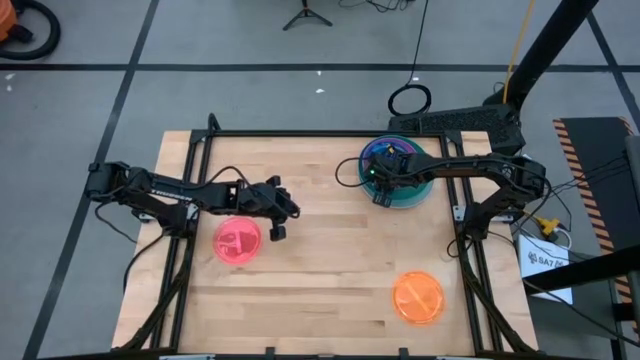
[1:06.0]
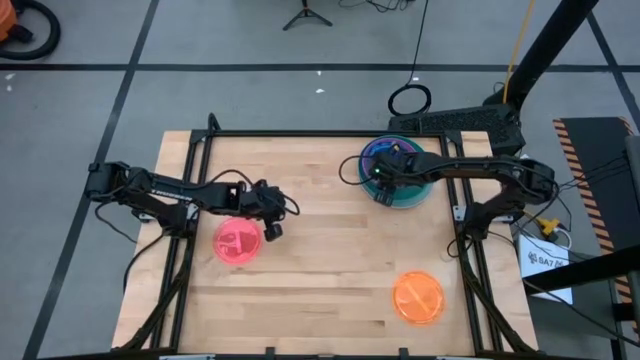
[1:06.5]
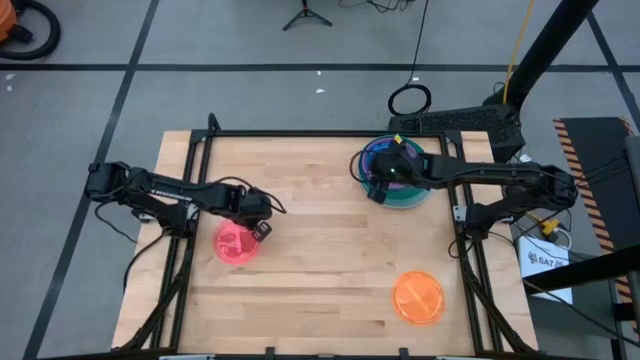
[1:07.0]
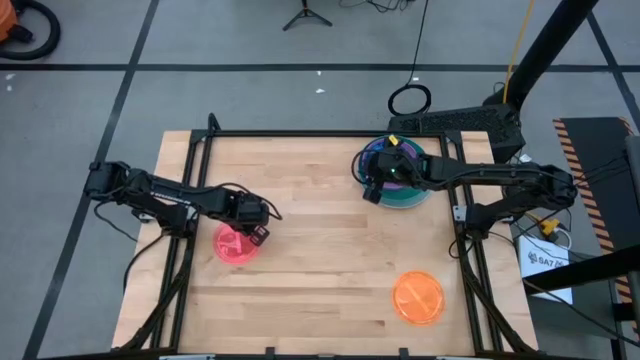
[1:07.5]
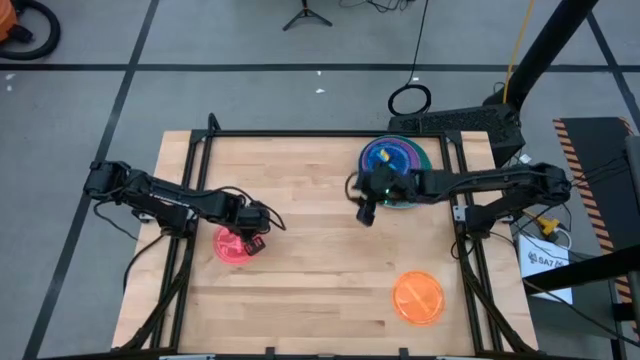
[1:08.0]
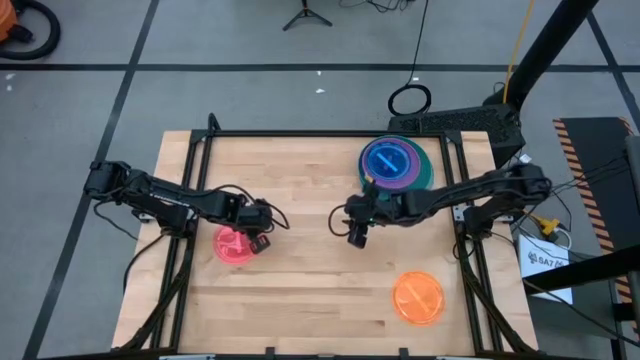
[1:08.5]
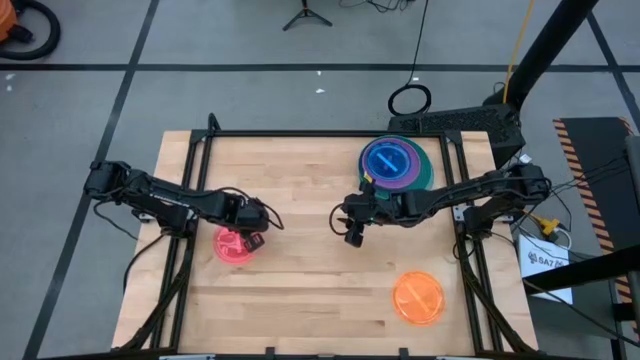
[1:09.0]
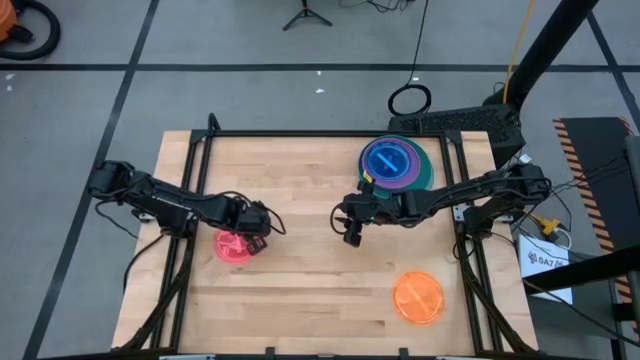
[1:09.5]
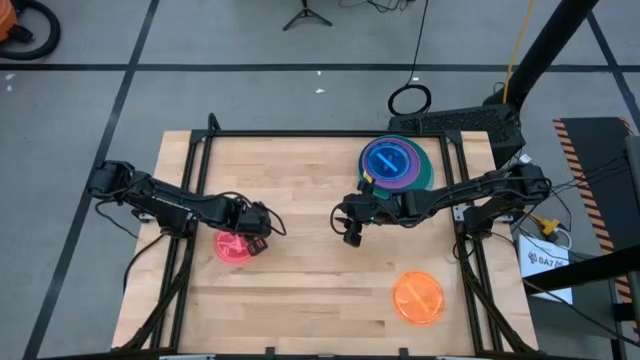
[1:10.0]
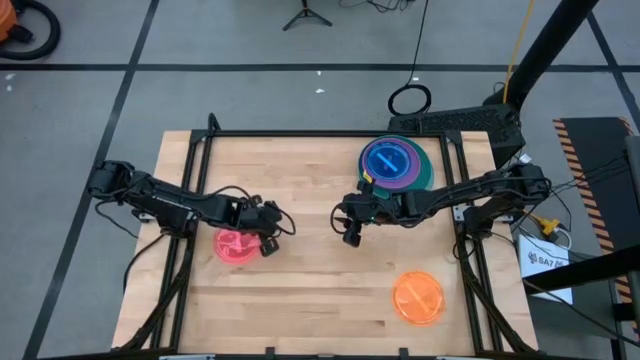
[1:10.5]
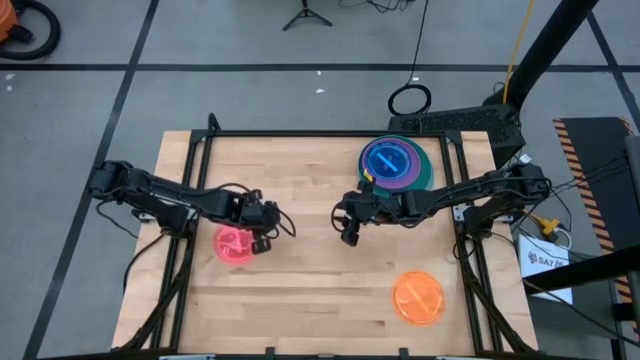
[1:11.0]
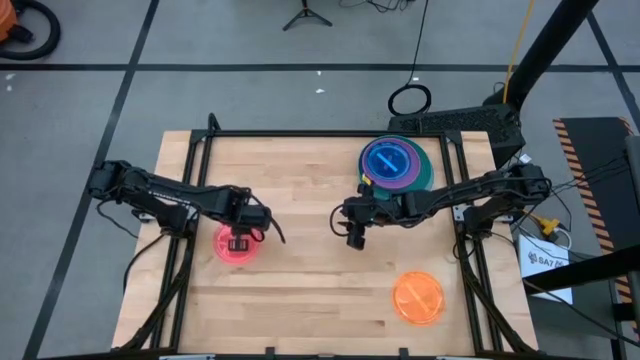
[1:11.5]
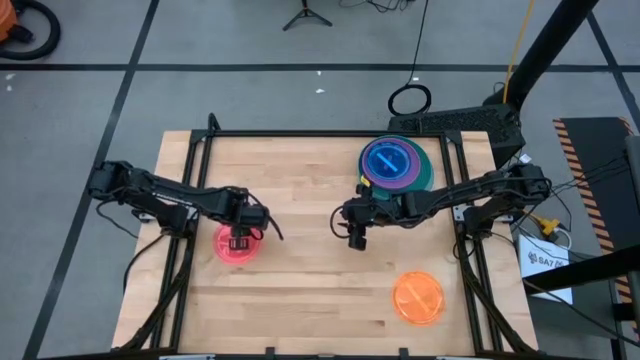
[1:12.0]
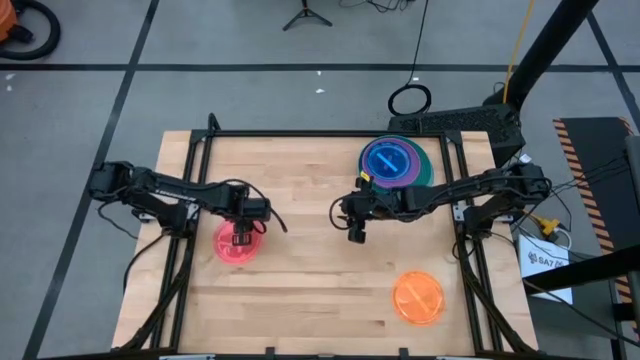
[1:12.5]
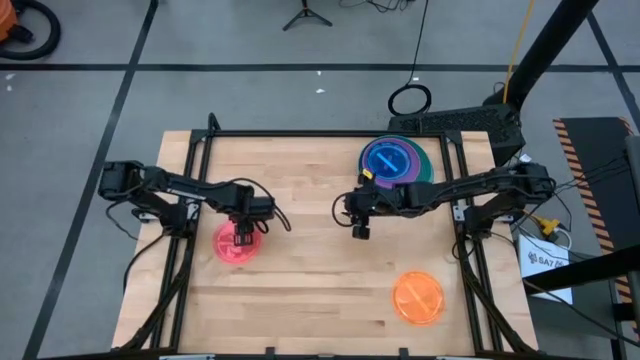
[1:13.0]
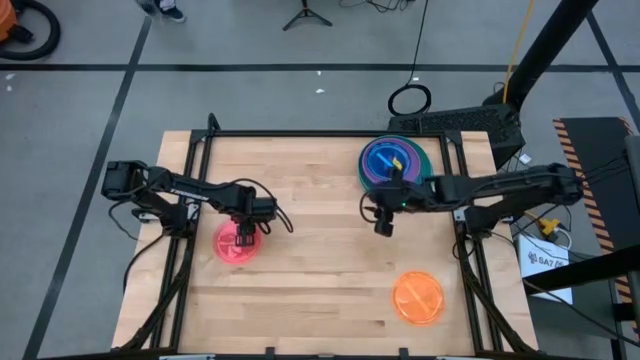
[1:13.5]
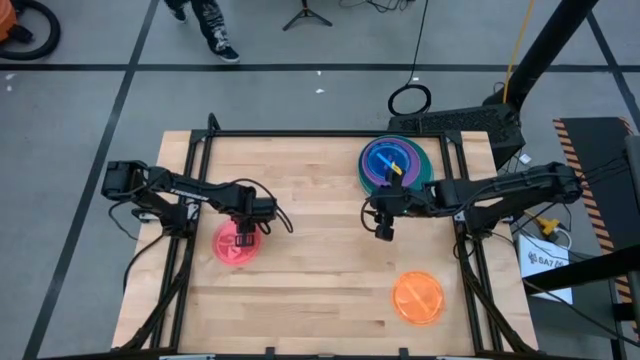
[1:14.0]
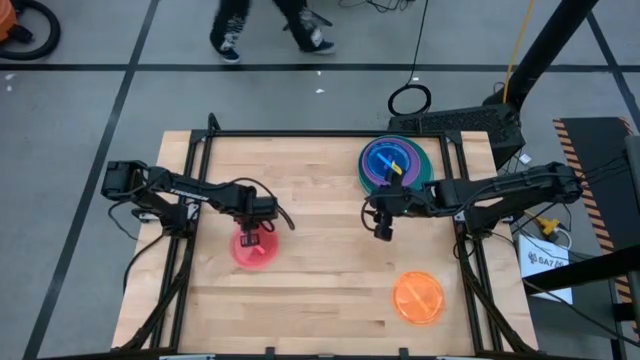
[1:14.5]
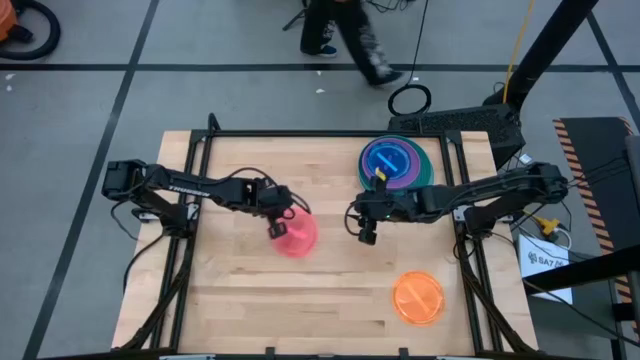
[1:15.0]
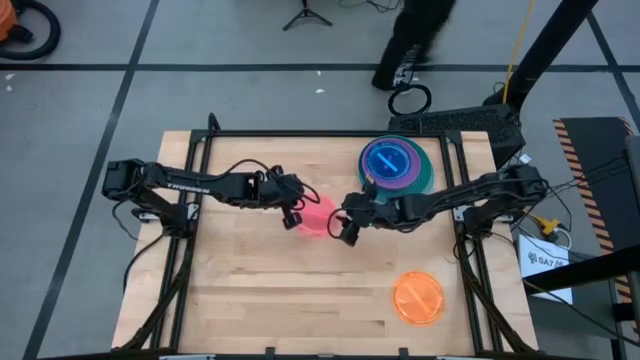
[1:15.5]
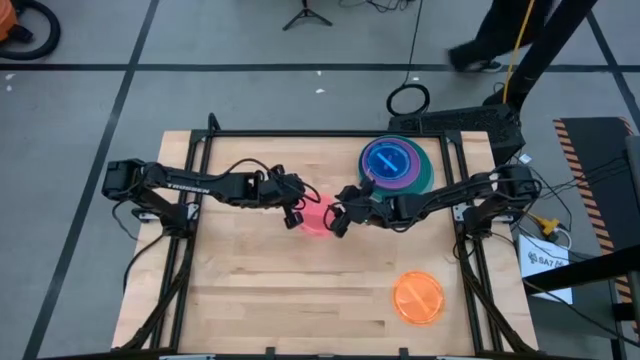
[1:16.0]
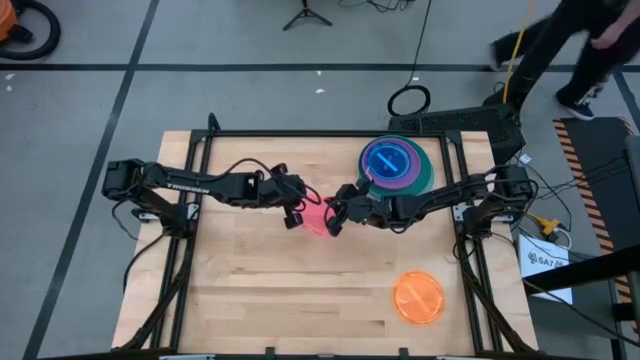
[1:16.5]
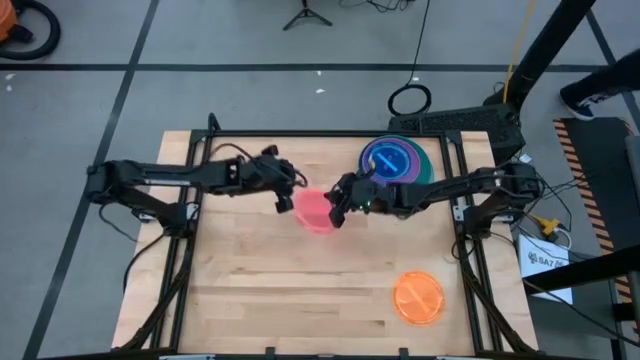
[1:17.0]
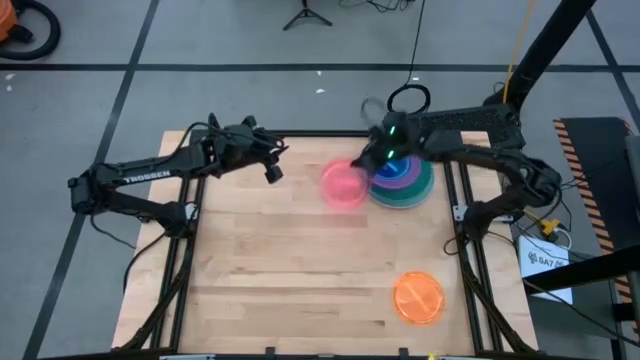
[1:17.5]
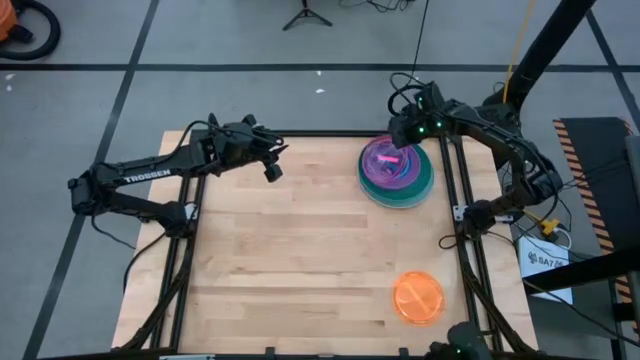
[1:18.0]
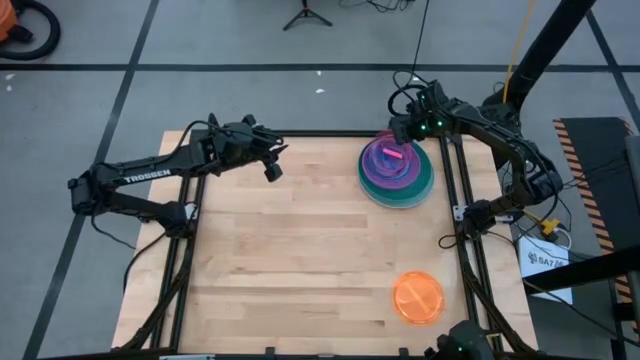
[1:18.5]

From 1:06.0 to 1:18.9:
Task: Stack plastic plates
Stack the pink plate on top of the blue plate

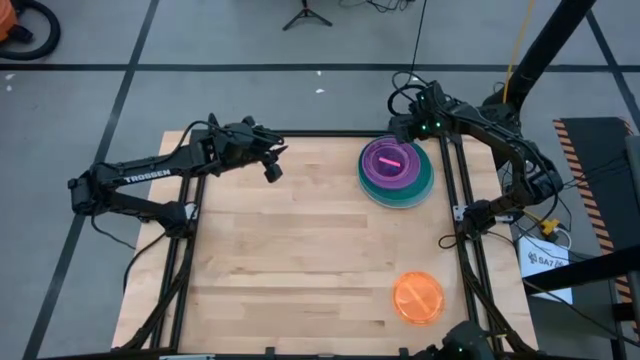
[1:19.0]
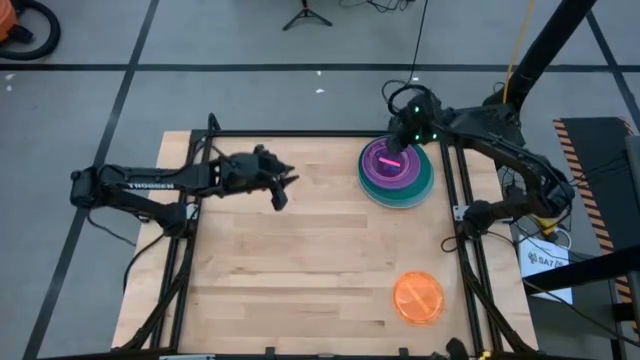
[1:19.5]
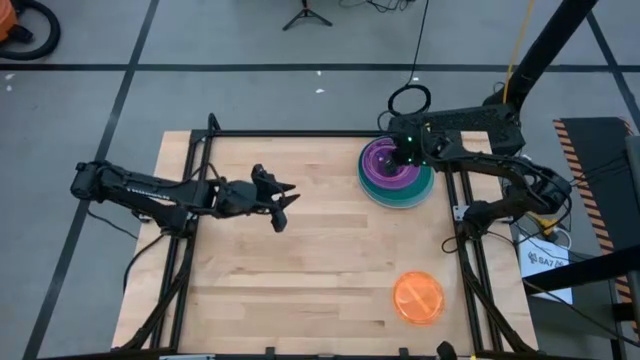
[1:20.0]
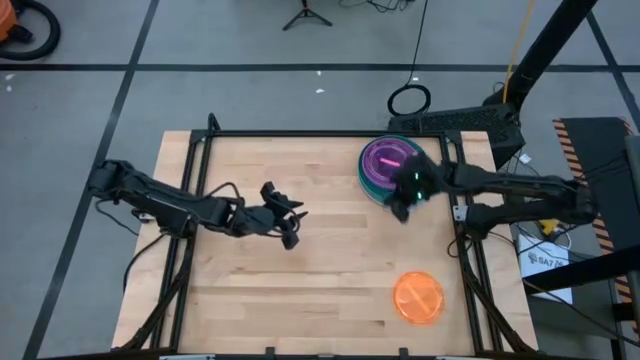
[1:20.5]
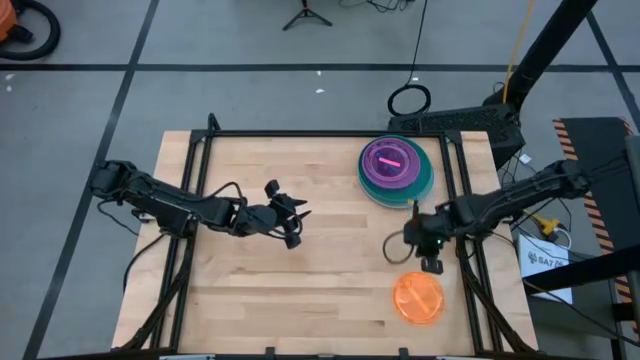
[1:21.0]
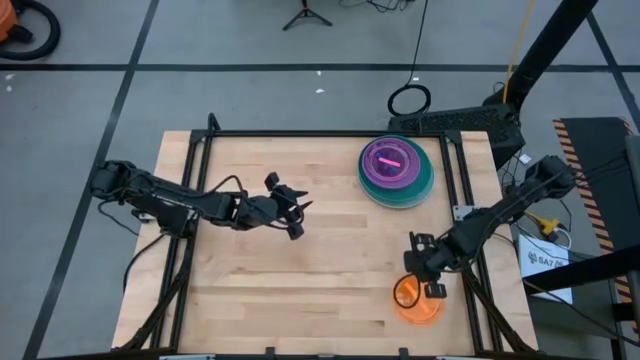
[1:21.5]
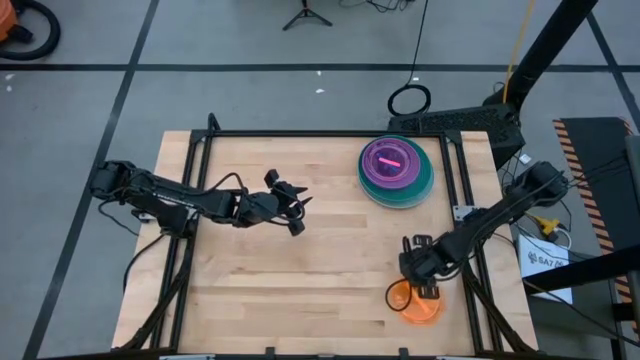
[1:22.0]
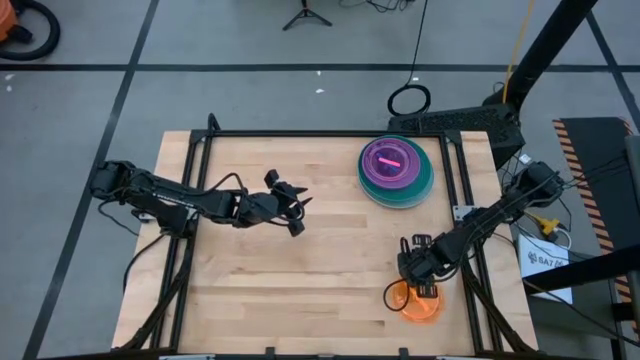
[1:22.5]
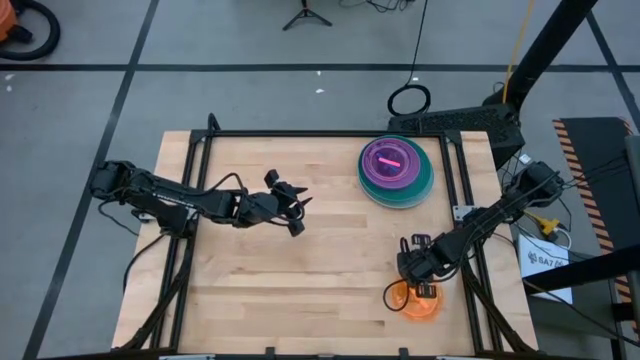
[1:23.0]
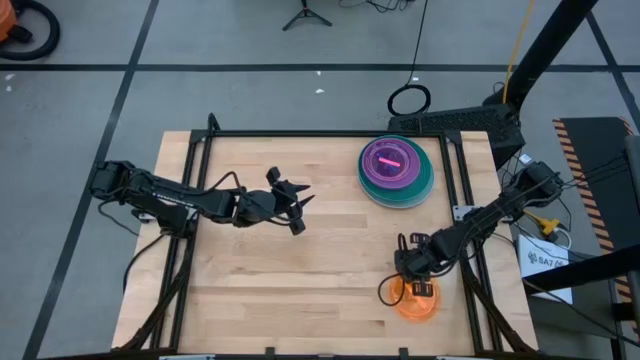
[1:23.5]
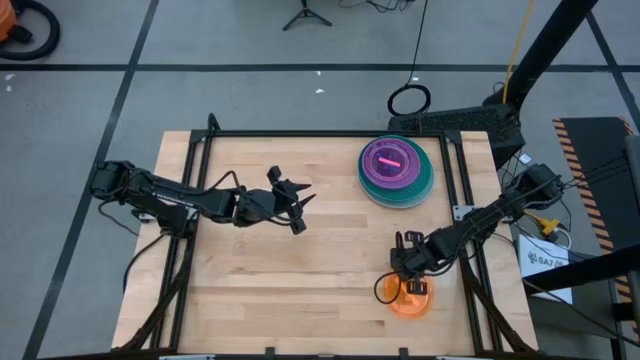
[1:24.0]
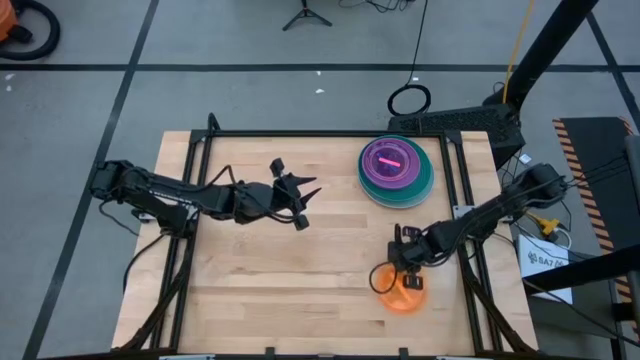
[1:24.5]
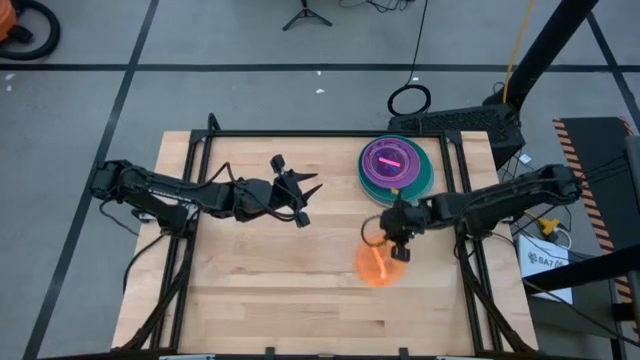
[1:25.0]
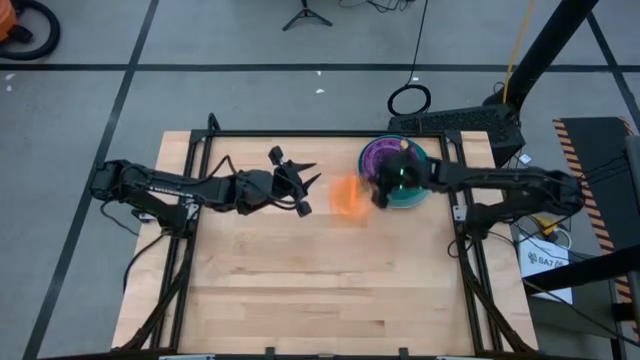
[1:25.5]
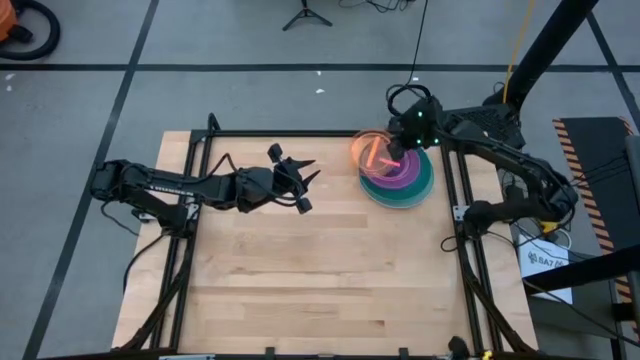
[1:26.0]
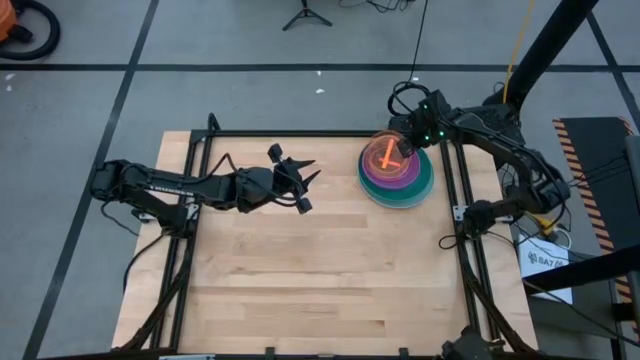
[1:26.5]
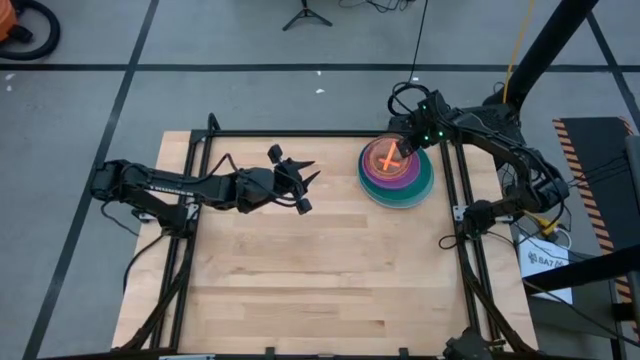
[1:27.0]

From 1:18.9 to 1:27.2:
Stack the orange plate on top of the pink plate
